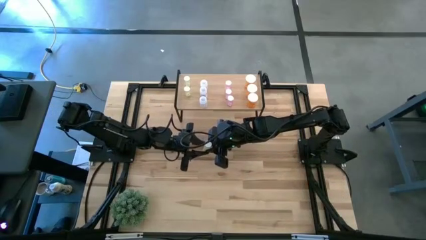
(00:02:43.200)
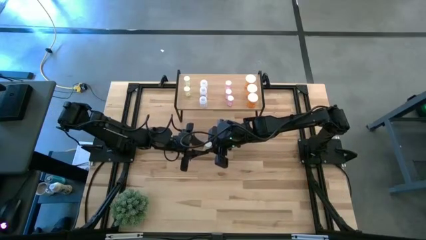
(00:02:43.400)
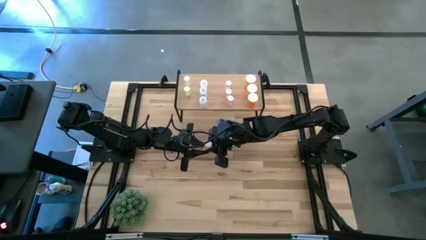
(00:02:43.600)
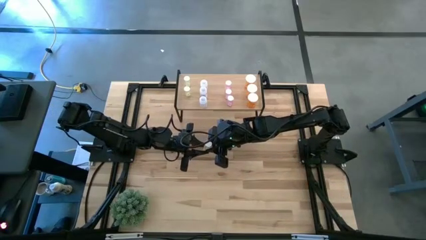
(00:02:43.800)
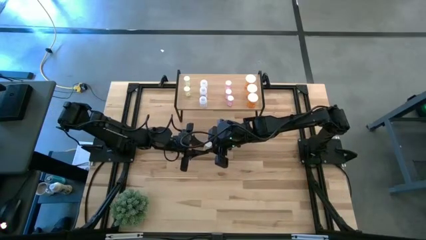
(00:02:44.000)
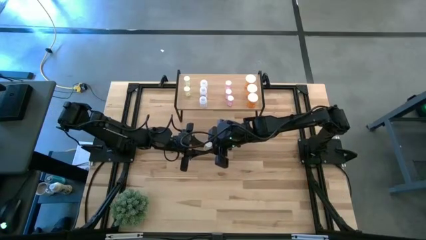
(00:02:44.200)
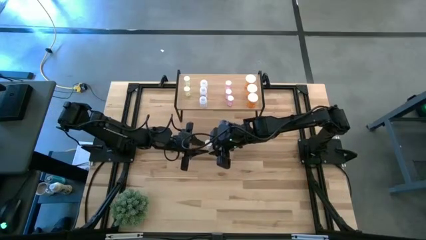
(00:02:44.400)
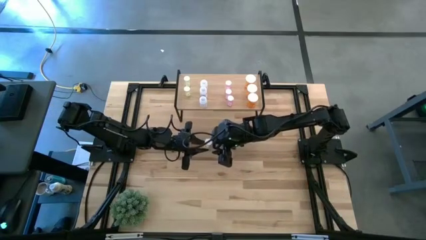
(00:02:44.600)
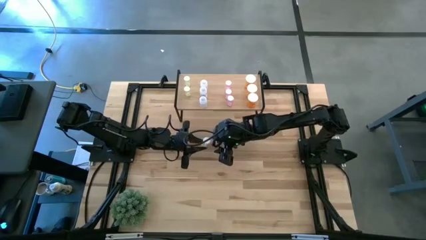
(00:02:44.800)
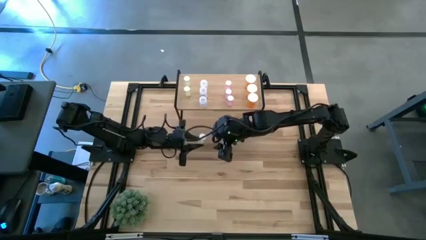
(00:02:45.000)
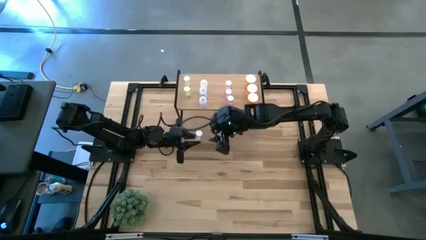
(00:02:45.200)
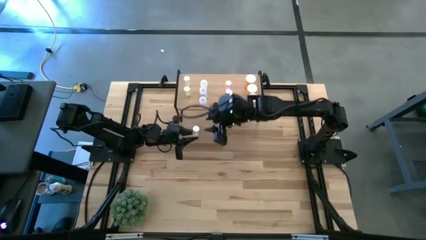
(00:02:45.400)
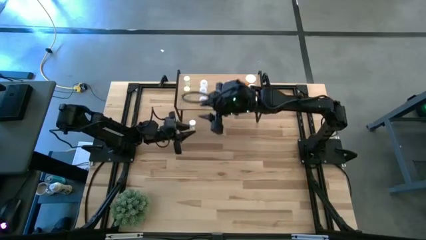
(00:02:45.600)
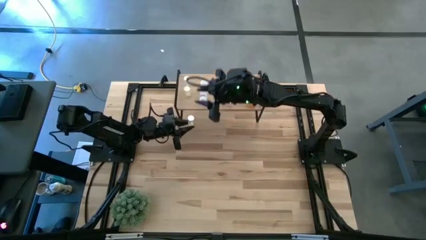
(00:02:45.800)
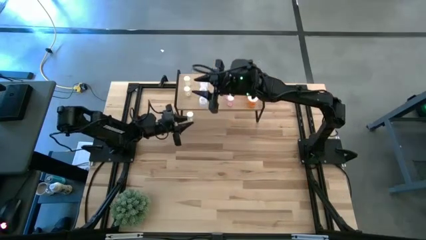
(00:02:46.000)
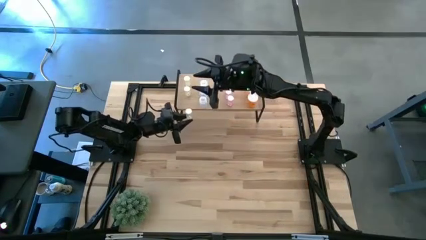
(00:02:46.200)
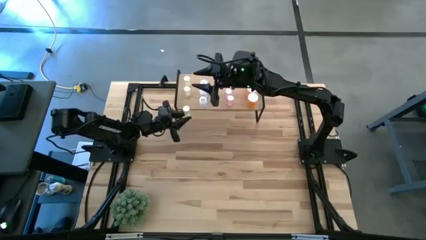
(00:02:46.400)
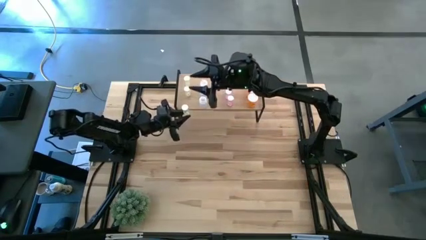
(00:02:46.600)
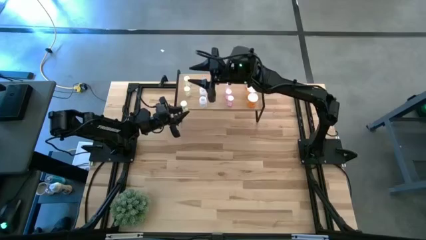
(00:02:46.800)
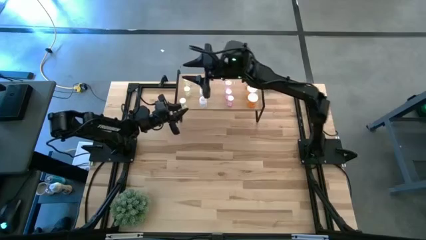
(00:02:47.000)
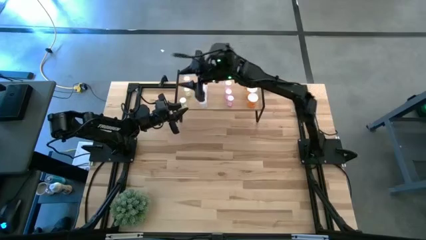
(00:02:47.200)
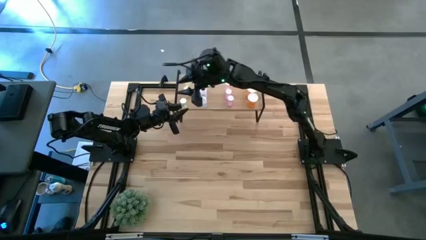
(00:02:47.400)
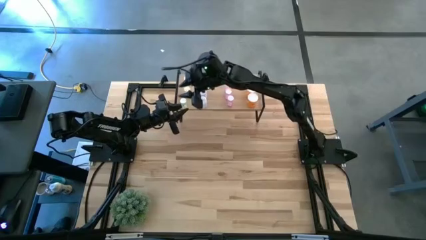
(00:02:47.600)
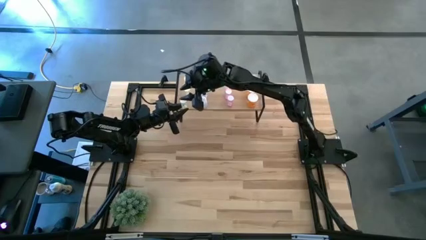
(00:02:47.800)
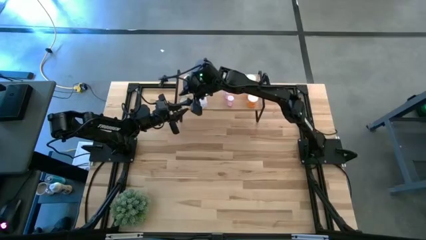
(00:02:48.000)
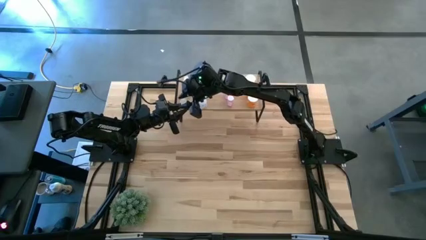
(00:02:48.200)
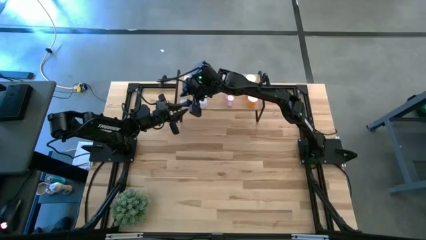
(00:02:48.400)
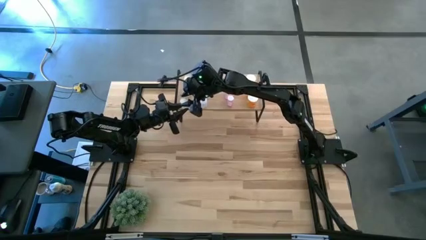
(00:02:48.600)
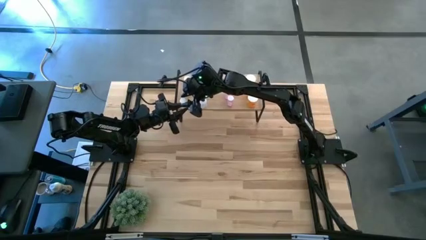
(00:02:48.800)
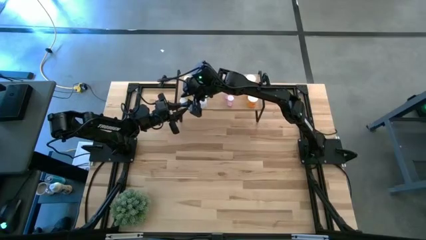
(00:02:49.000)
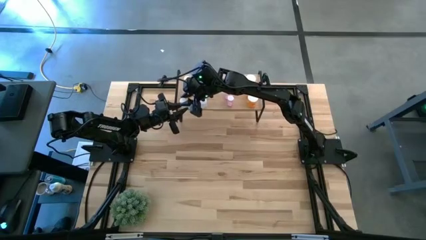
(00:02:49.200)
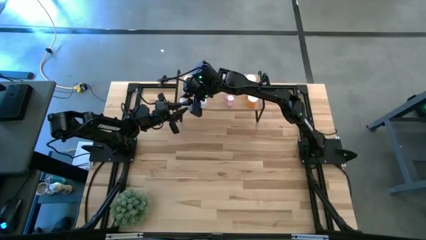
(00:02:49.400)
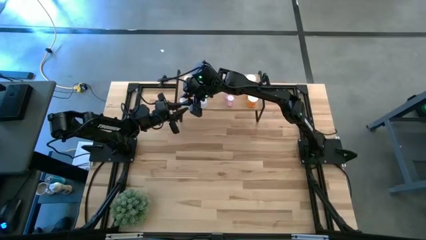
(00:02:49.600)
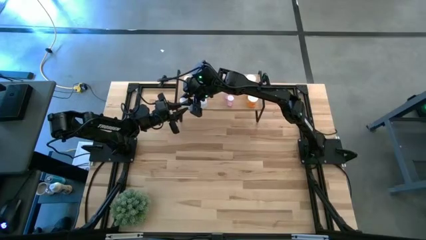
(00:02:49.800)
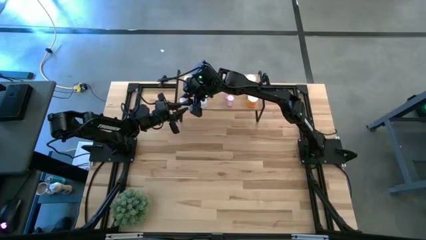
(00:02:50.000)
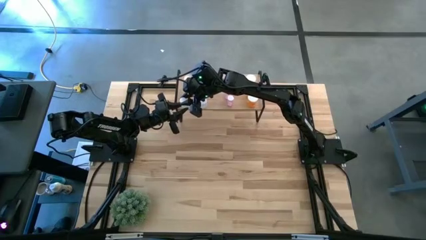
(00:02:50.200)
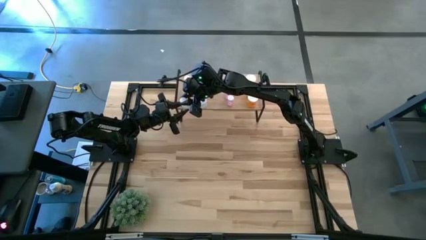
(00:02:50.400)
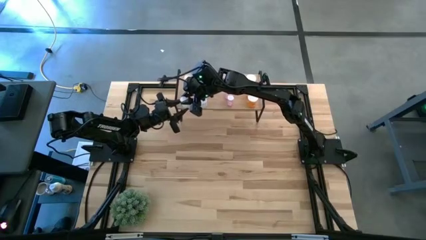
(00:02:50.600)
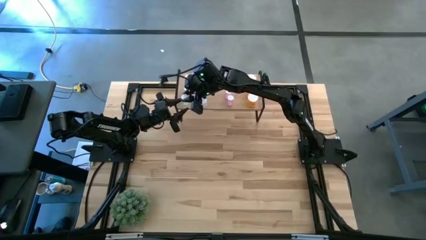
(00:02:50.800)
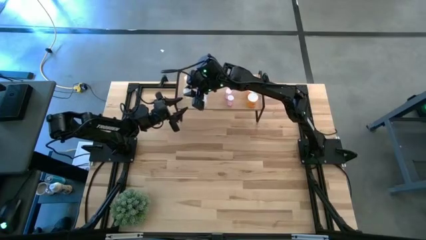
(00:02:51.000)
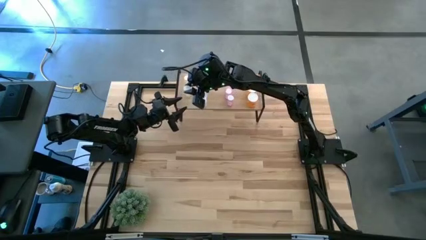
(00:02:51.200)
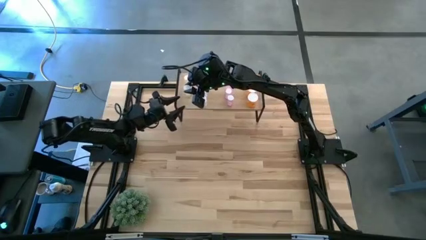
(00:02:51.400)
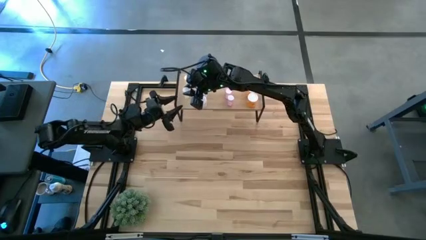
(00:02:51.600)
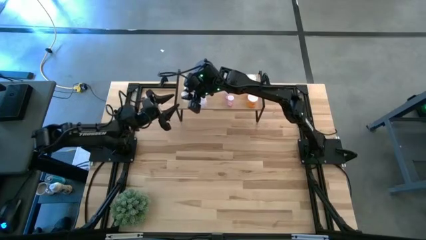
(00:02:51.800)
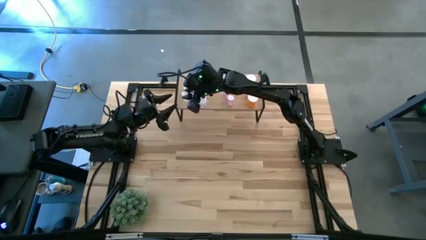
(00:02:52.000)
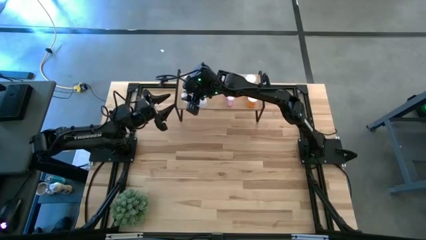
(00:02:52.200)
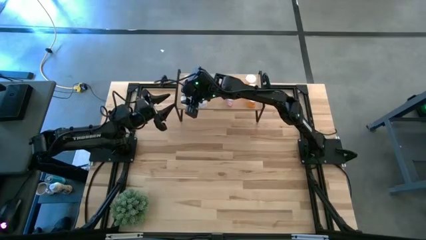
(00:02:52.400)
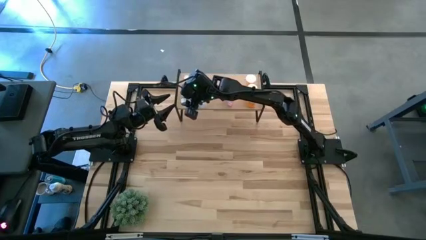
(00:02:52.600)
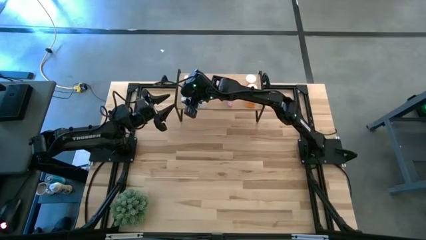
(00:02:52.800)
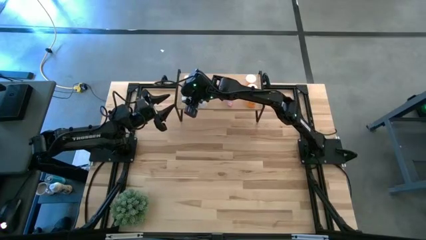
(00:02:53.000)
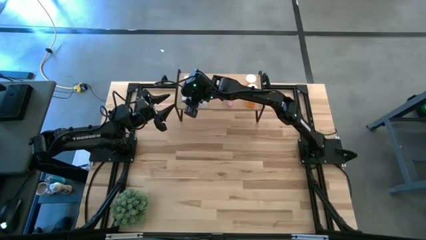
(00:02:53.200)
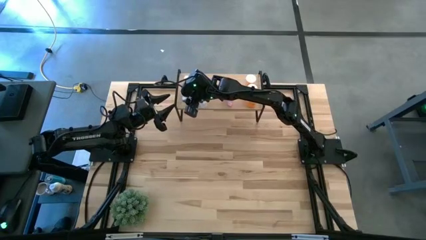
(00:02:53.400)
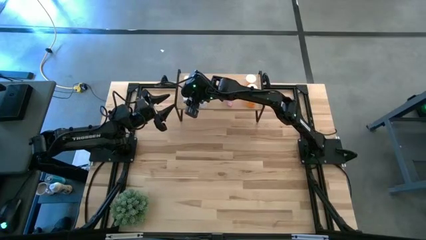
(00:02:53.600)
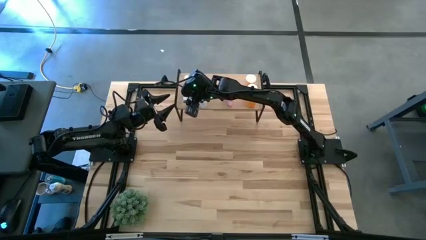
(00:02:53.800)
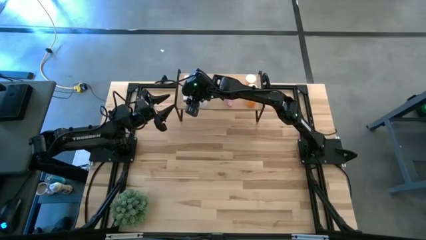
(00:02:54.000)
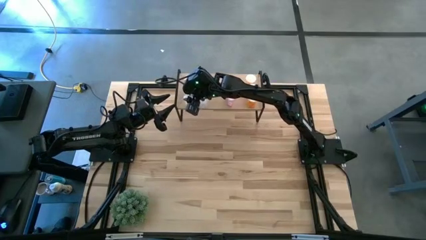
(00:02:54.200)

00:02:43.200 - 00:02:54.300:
Task: Pick and place medicine bottles onto shelf by color
Put the yellow pill bottle aligned with the other yellow pill bottles on the shelf

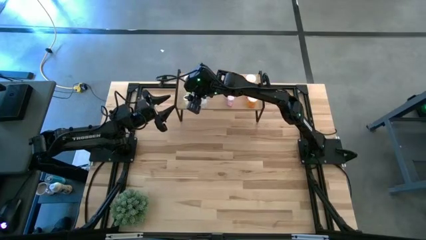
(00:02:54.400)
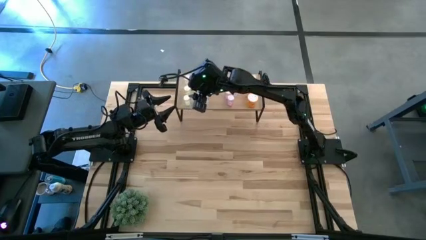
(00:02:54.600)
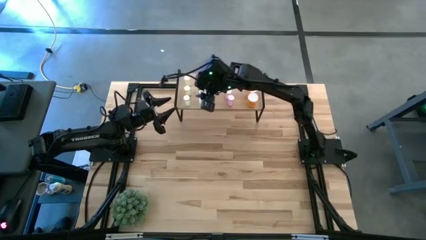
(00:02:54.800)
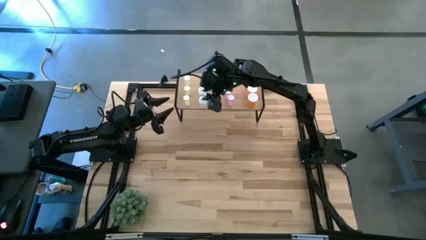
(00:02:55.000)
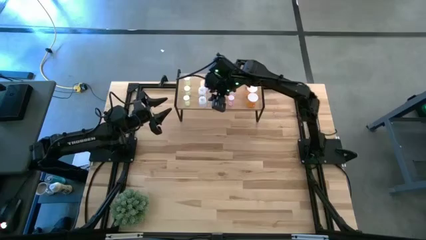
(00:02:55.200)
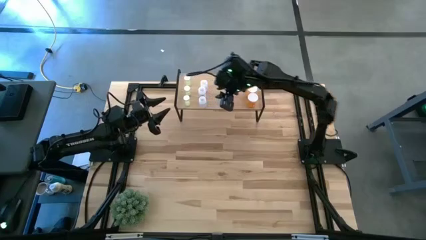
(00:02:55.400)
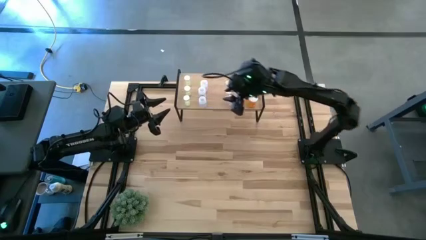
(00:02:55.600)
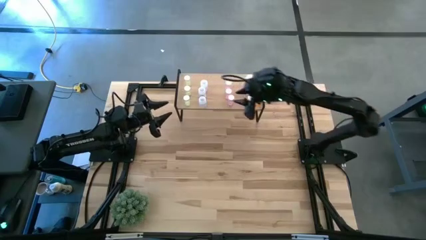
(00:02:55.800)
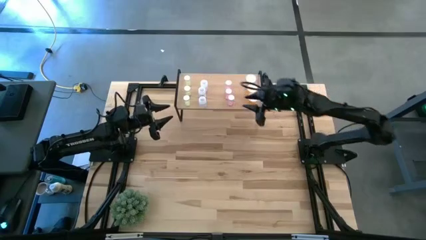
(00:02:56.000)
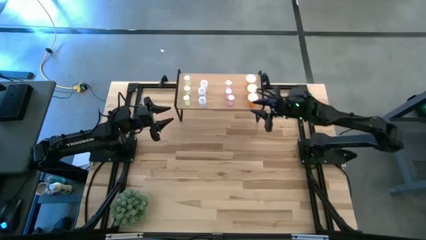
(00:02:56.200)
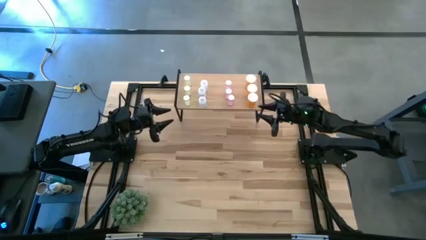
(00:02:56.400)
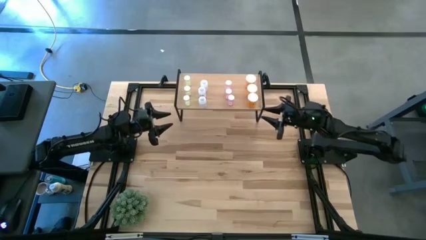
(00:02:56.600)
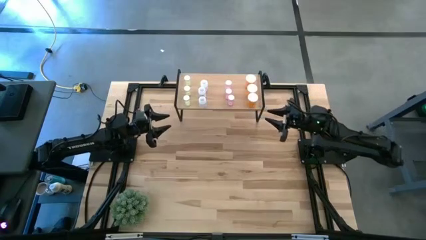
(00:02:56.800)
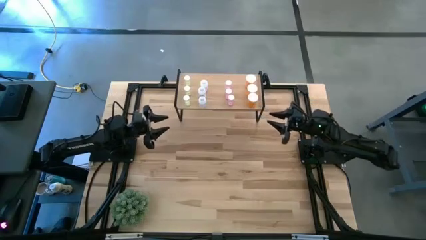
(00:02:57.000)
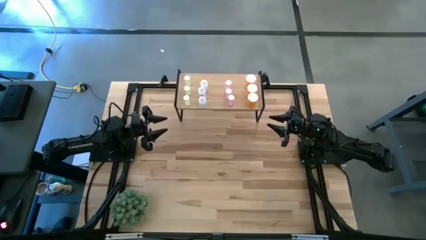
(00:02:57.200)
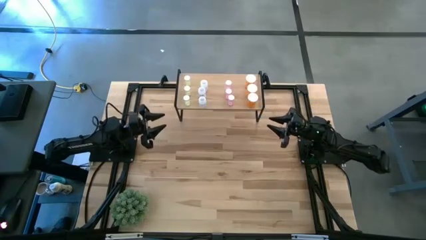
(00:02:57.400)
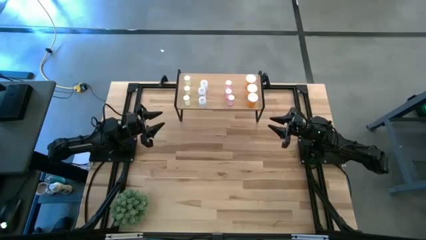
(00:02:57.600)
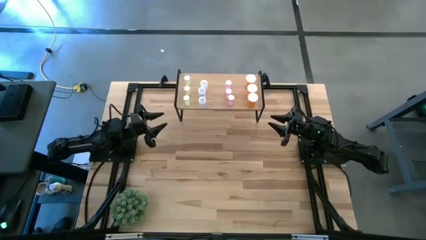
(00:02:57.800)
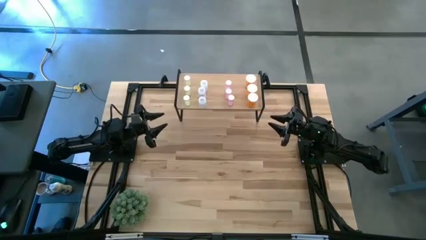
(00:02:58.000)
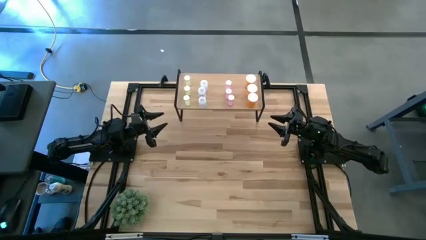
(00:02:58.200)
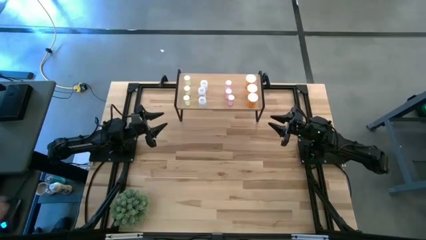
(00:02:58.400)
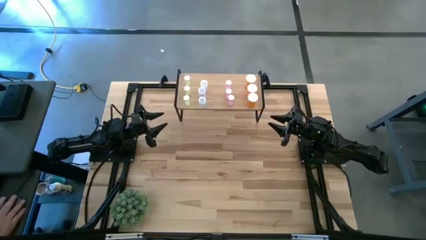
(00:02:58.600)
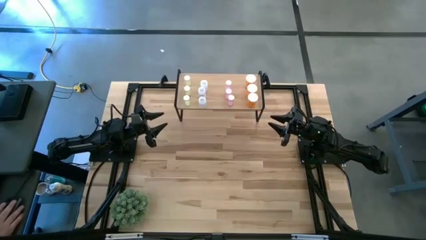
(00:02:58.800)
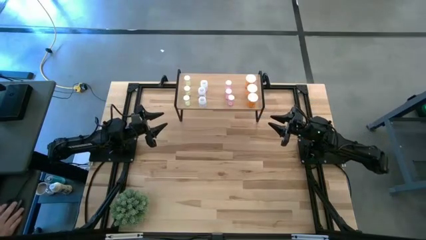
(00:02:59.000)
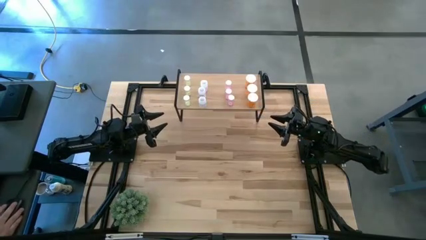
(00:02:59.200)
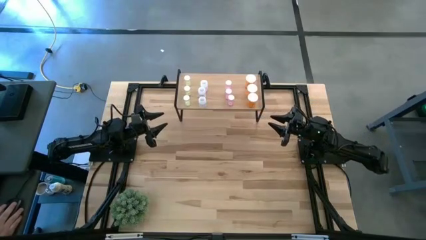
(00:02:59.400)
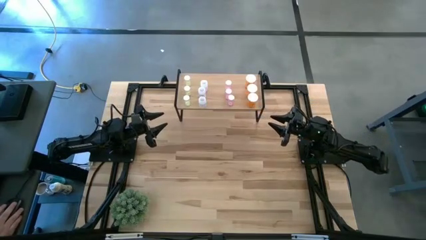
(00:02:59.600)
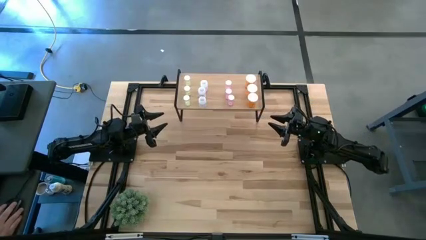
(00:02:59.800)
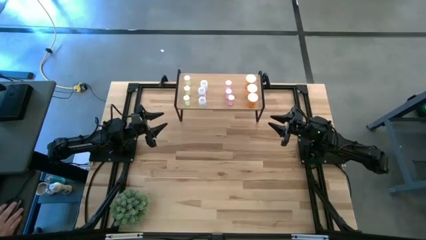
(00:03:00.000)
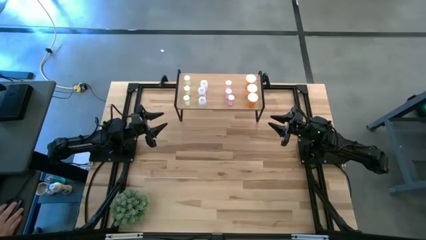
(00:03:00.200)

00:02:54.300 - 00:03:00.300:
Return to Home Position
